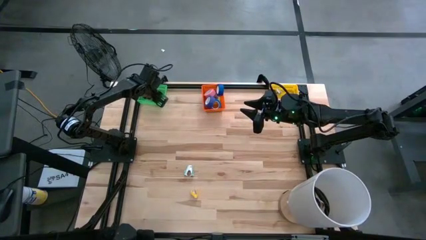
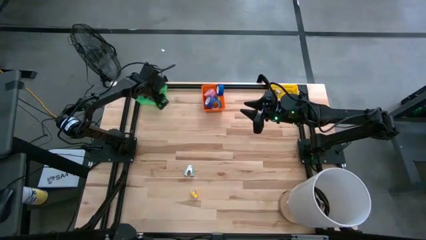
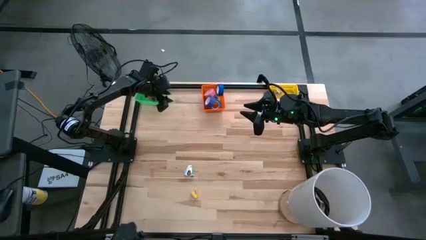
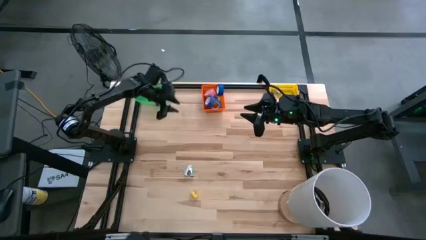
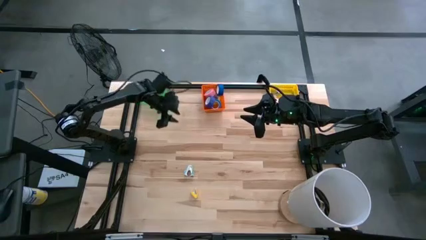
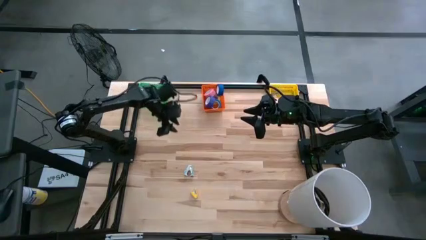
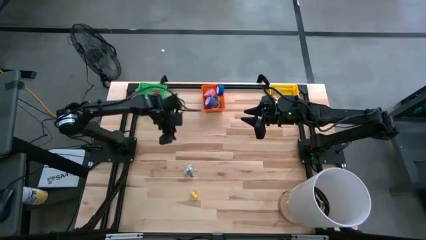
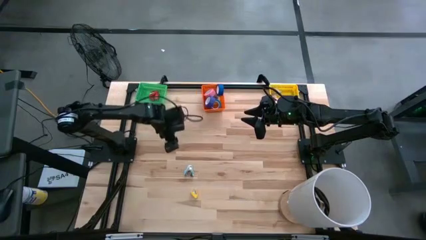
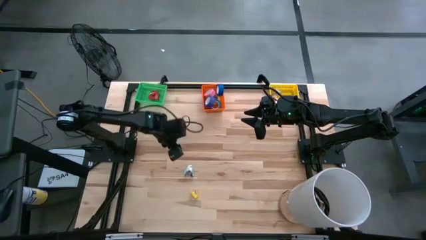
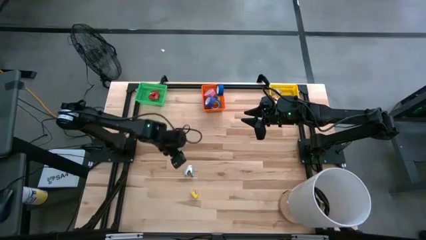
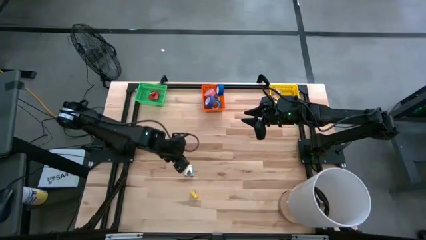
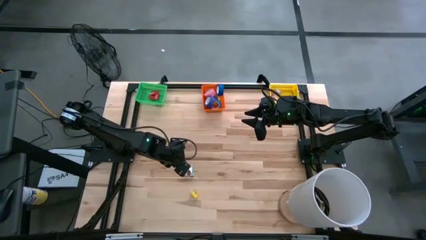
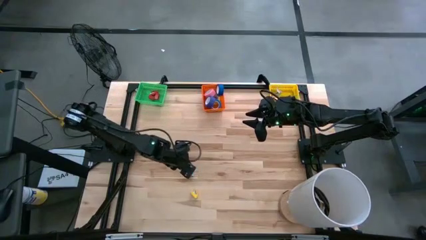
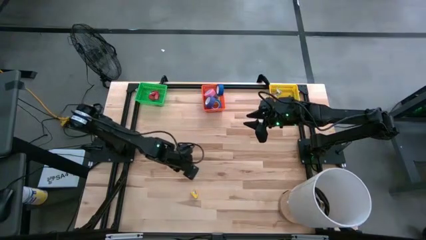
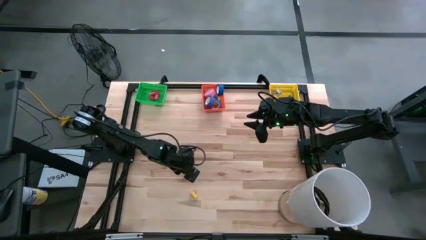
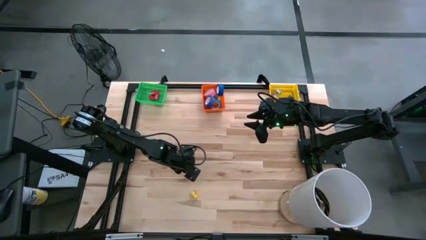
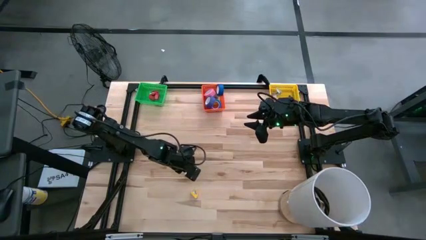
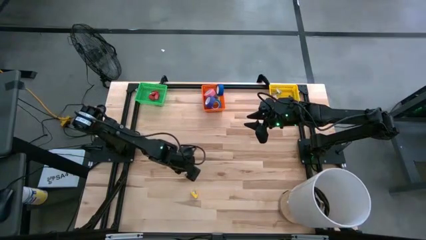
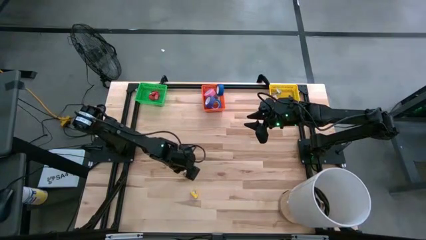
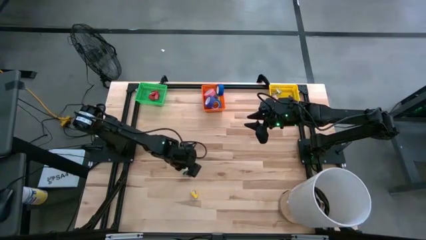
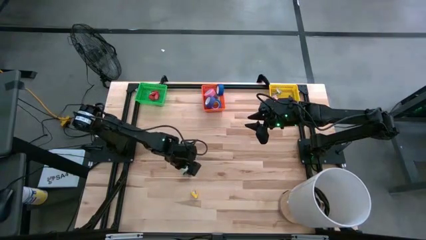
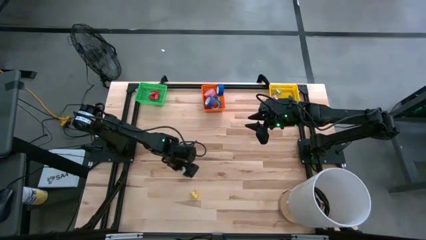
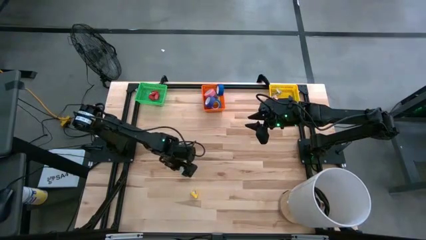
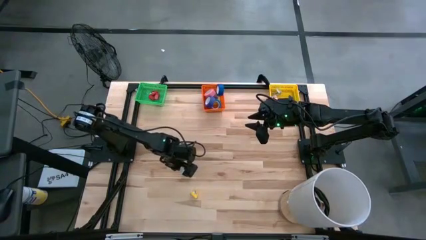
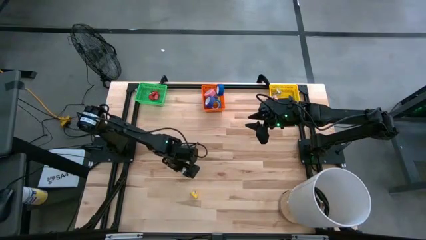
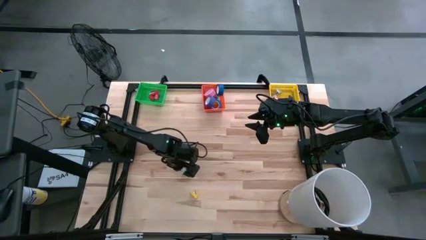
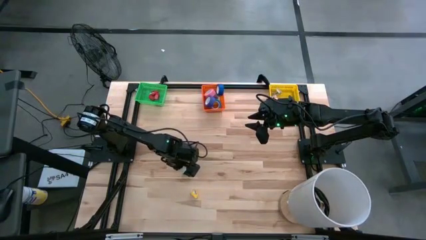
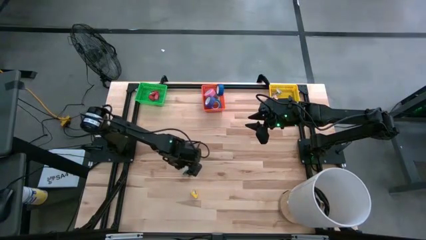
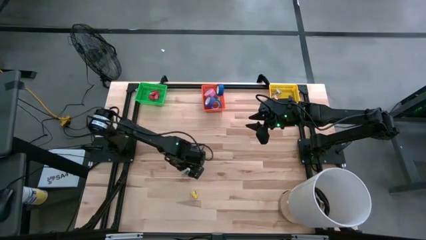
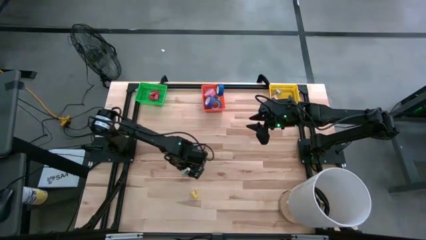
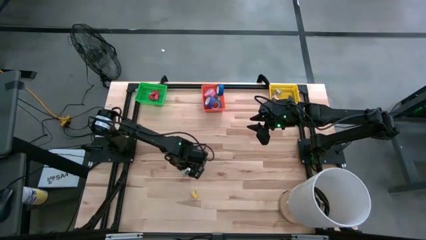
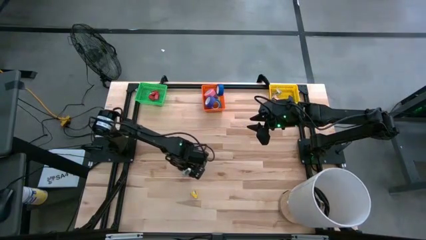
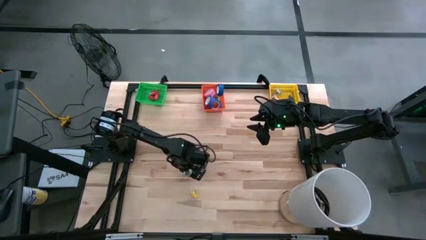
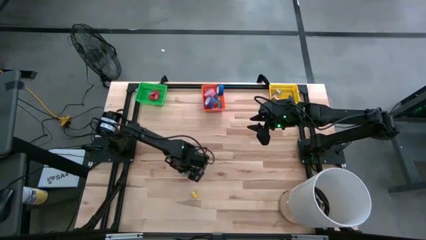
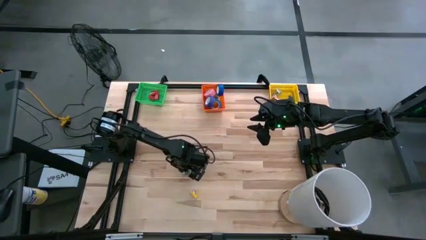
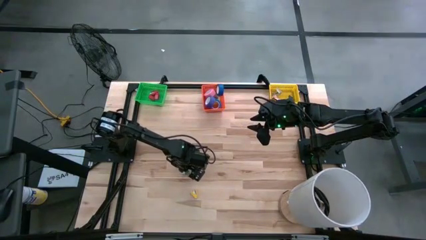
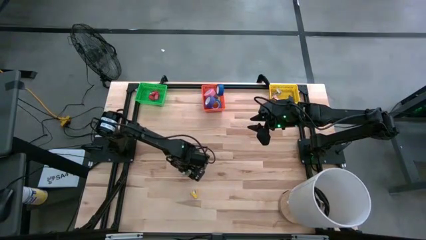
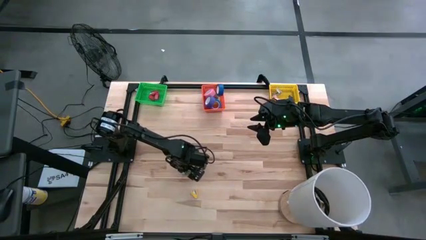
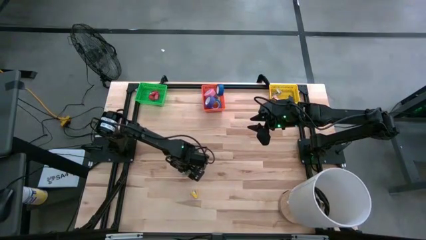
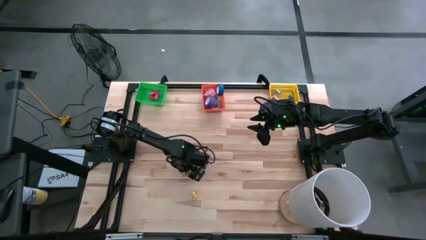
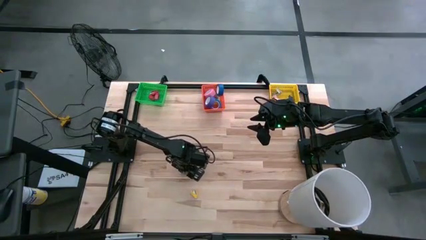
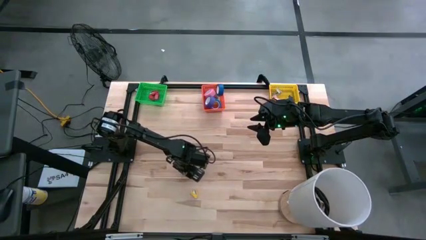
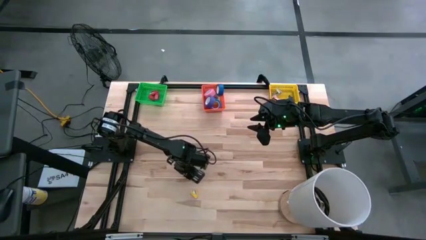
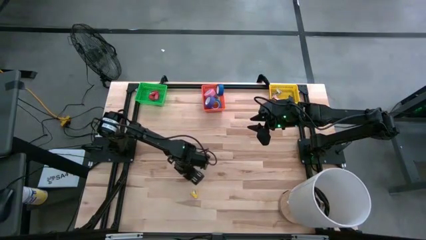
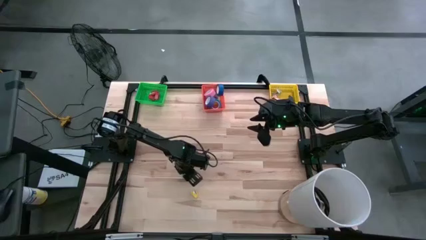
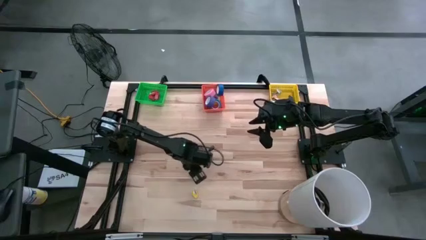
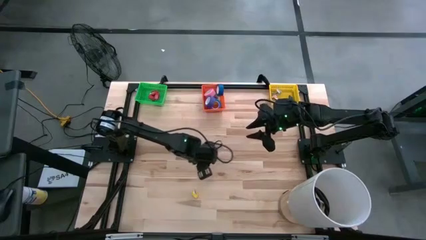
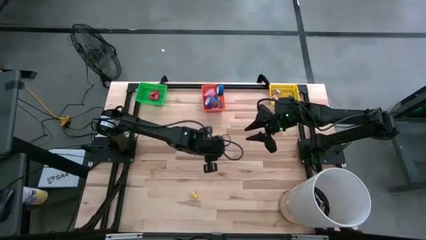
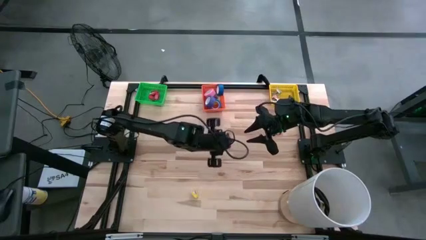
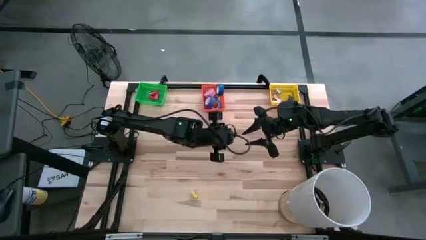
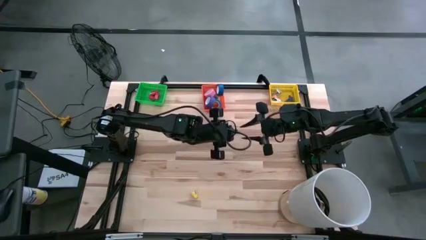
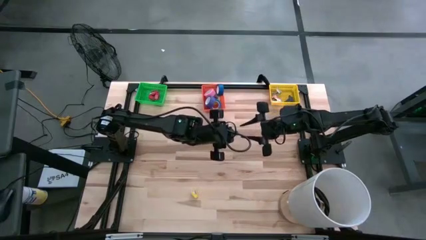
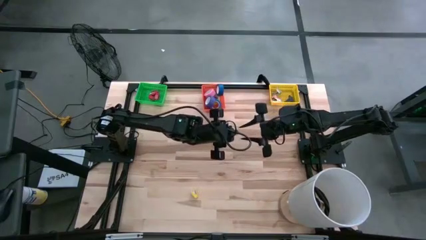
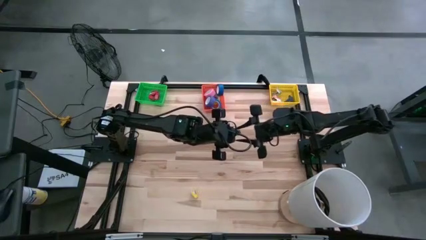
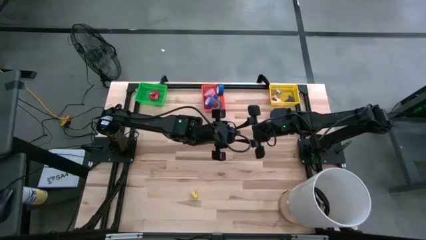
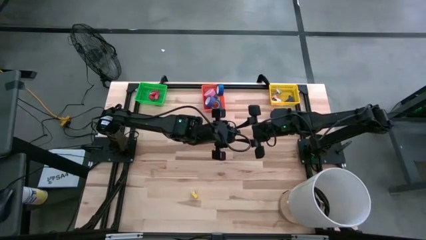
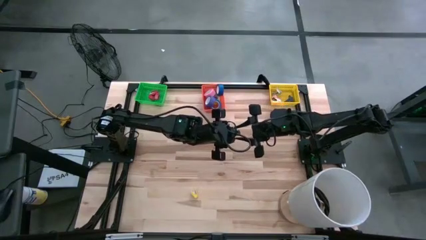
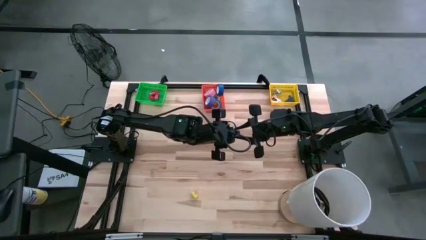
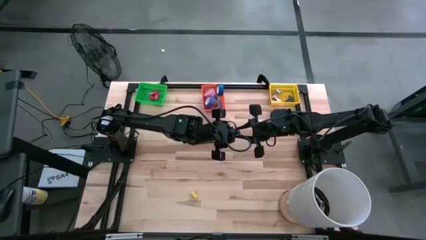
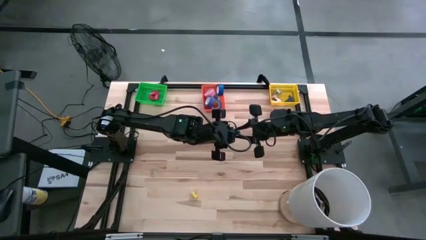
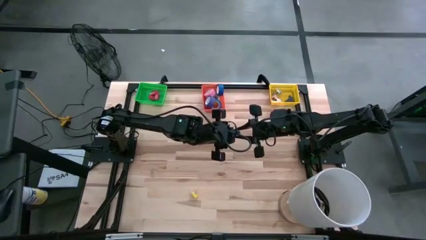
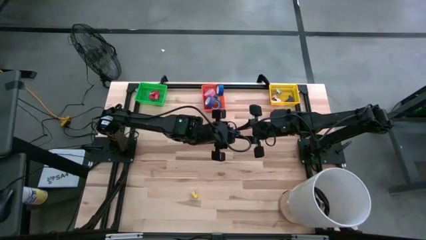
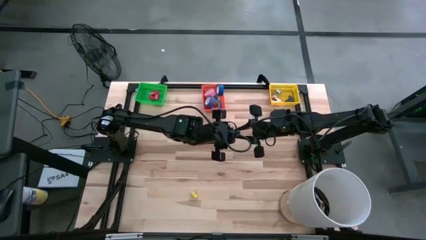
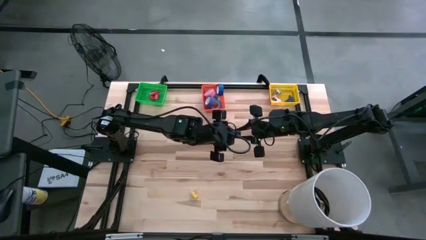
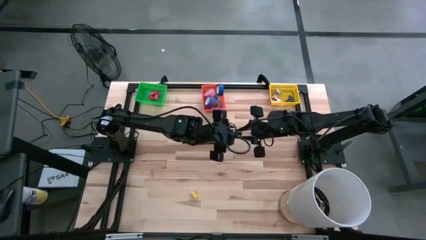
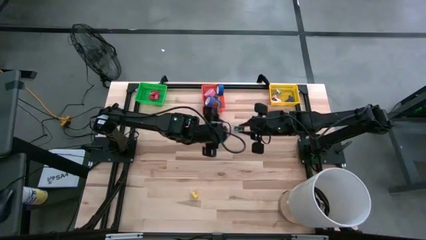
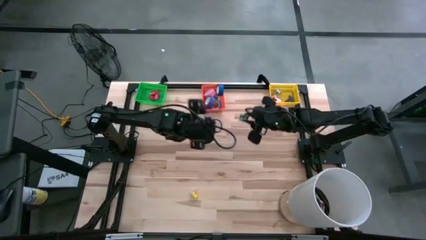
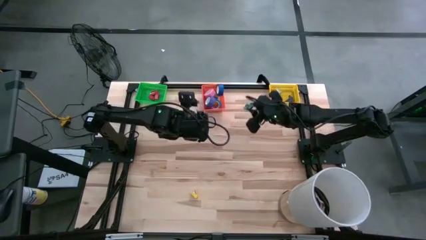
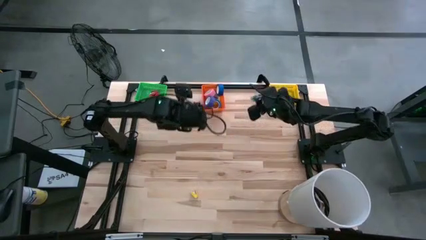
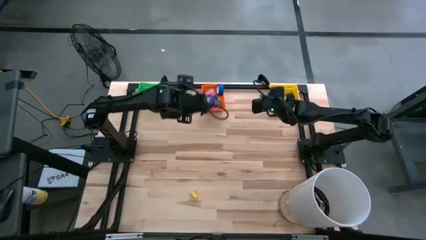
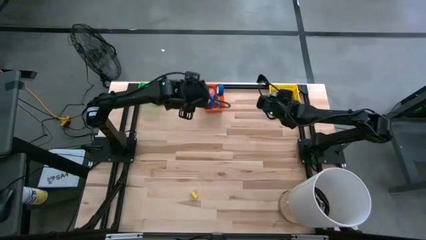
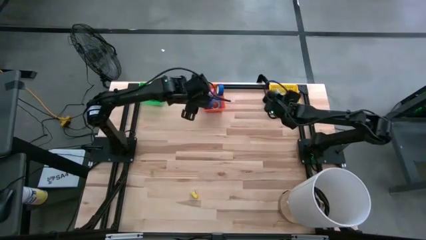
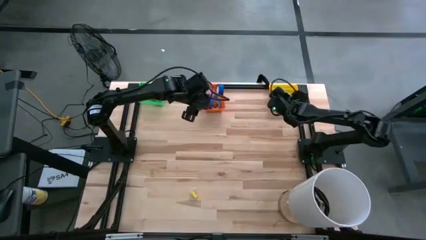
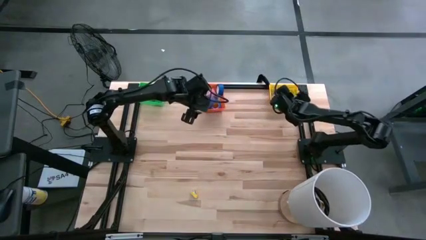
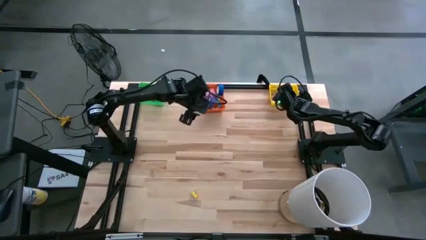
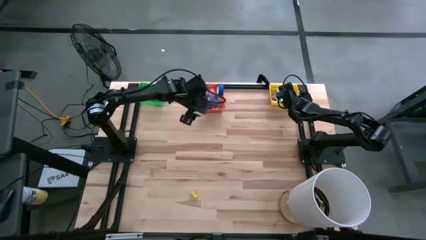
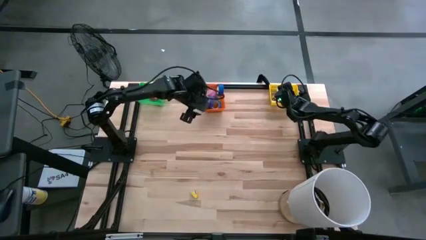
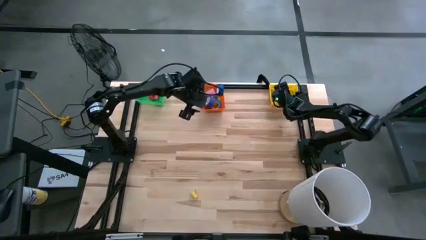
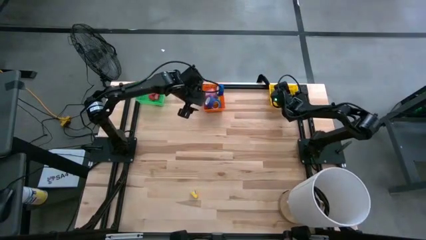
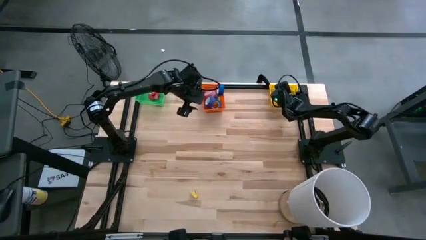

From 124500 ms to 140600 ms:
Task: Pick and place Stapler, Stapler remover, tape
Put the blue staple remover into the yellow bin
